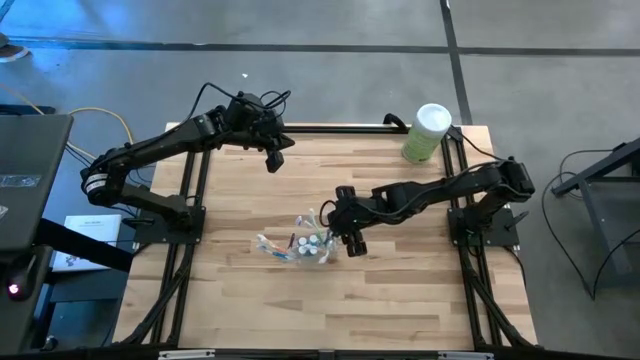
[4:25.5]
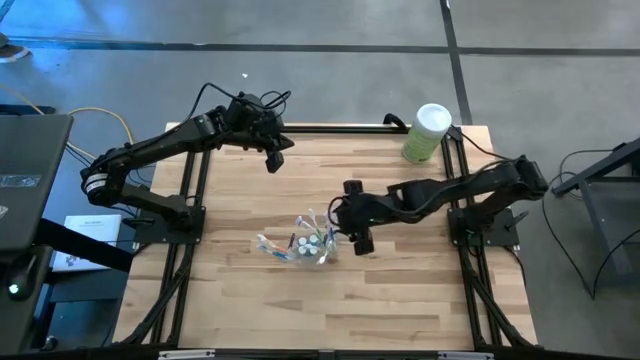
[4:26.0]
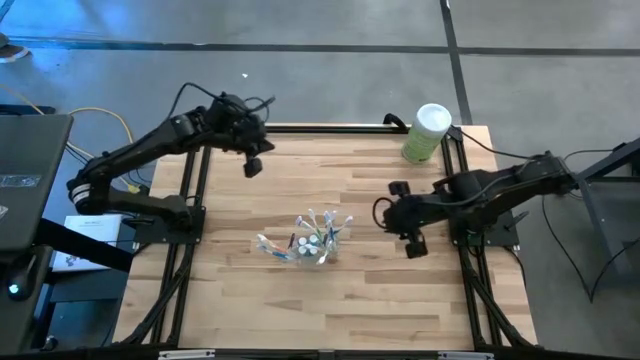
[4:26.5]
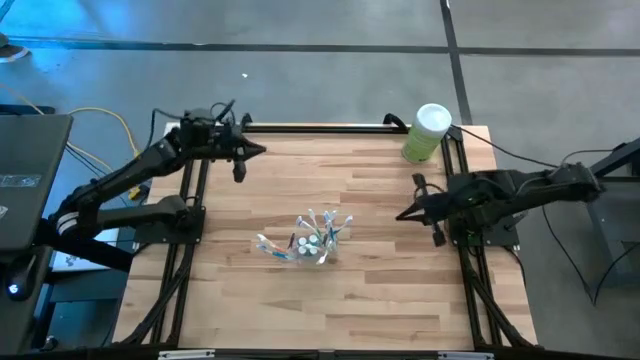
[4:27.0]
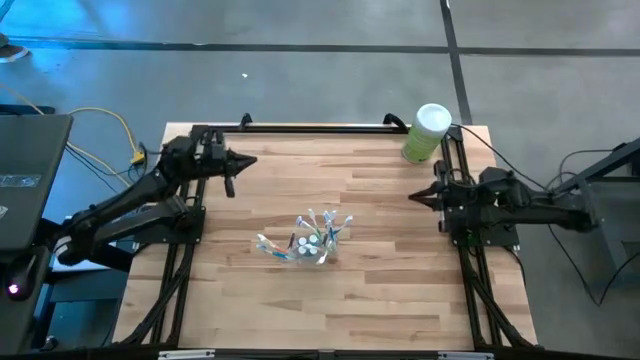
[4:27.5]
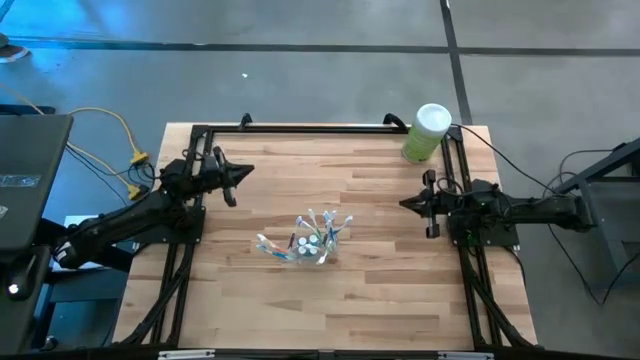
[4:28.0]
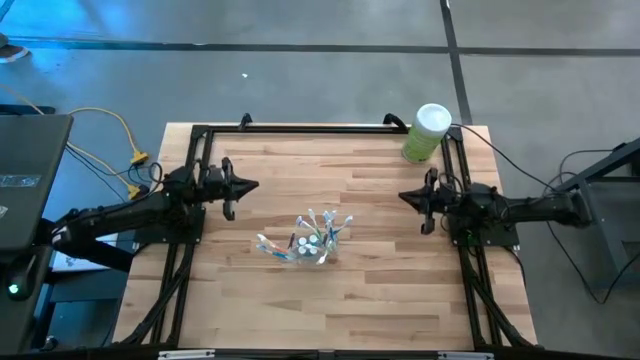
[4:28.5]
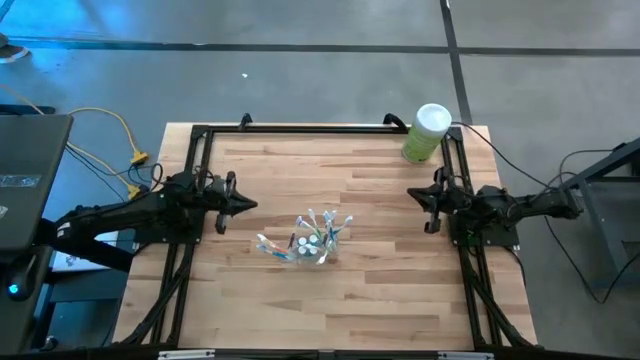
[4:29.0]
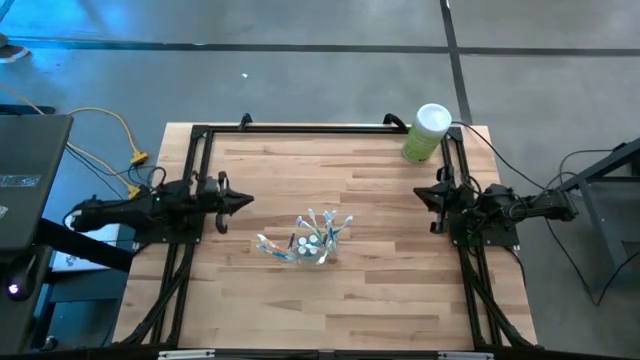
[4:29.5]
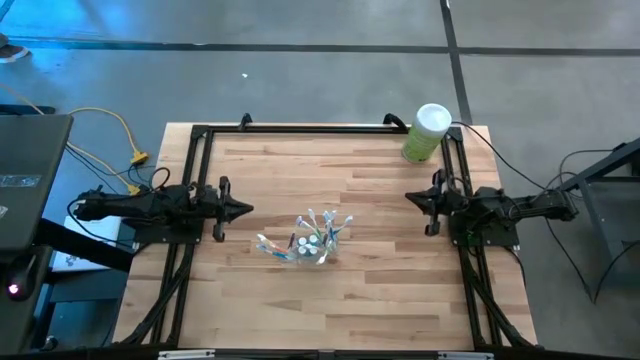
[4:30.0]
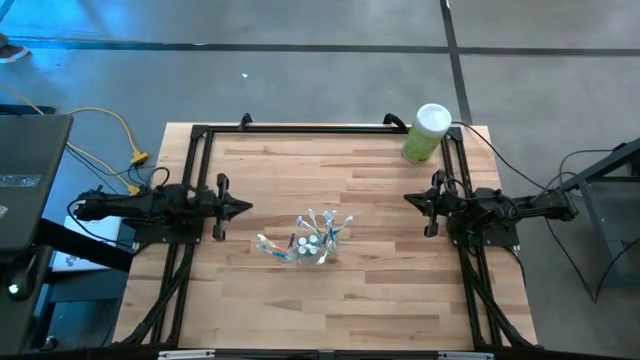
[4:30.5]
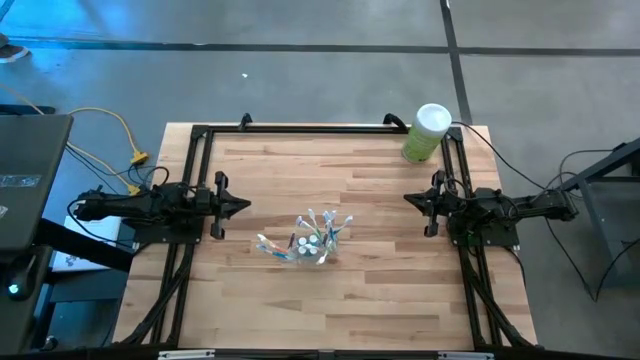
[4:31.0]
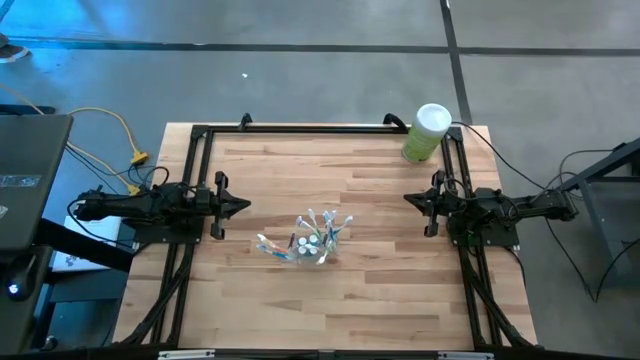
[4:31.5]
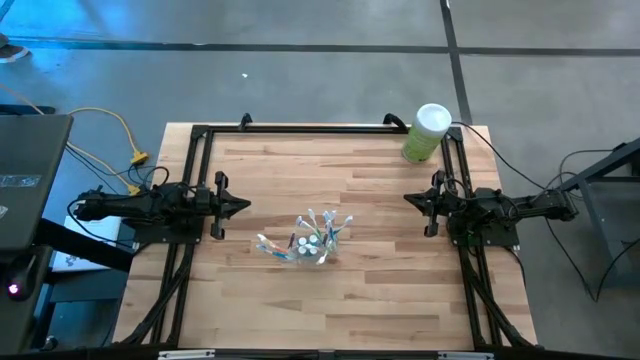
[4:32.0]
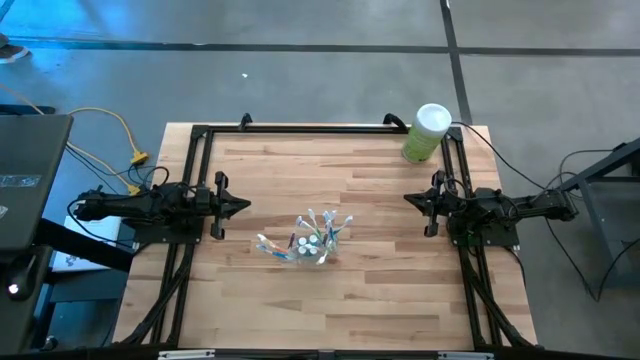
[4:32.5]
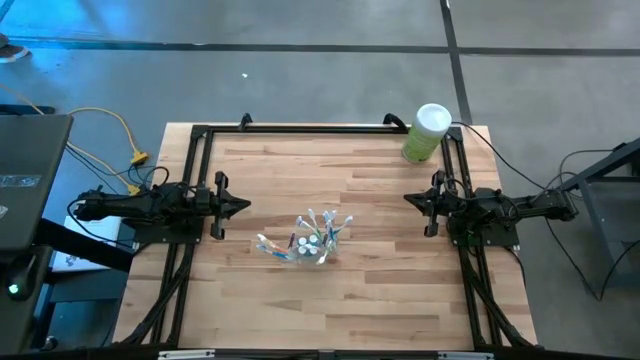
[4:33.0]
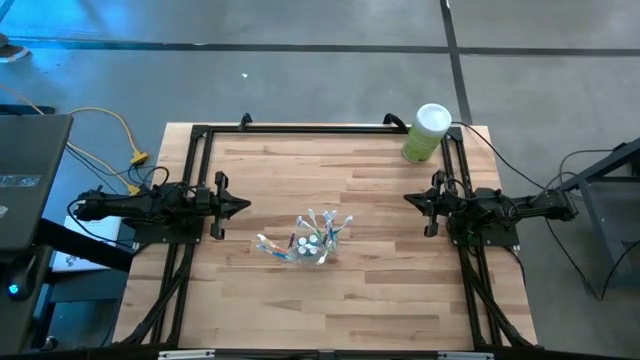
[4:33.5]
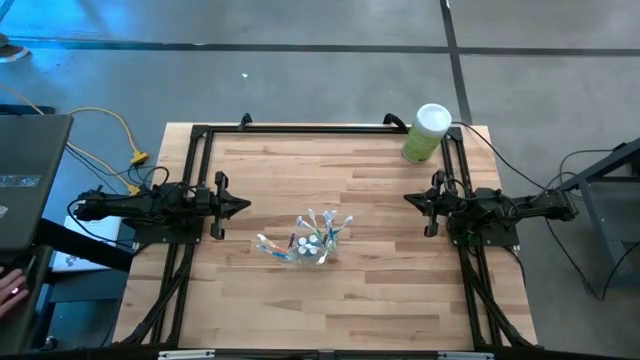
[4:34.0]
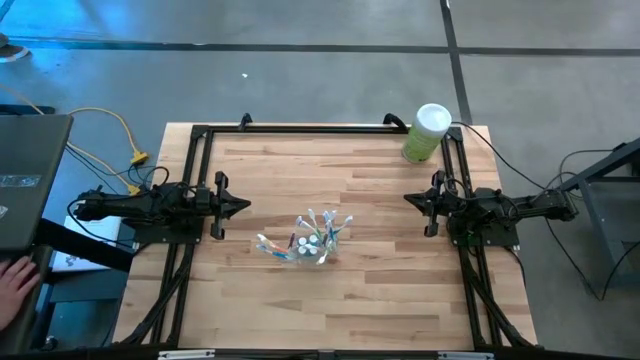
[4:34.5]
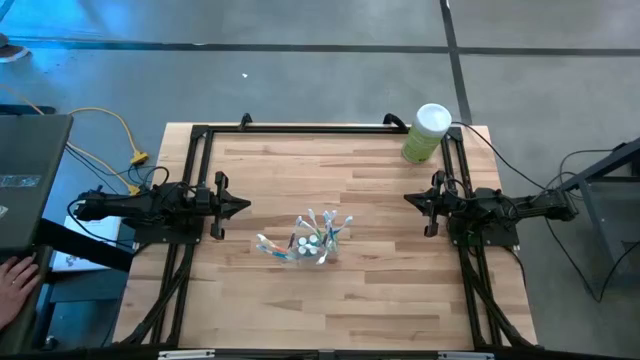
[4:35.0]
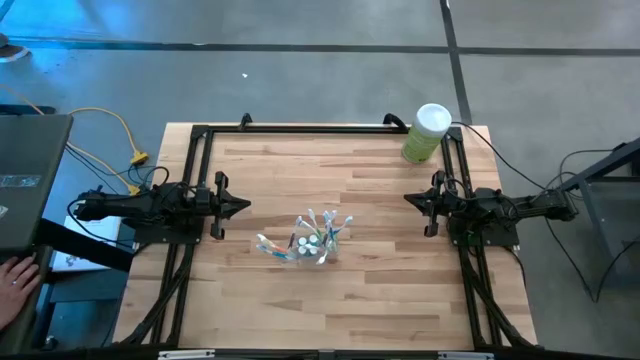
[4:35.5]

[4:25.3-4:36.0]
Task: Pick & Place toothbrushing station
Return to Home Position

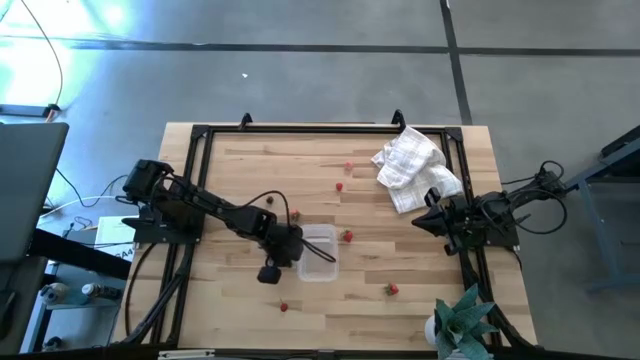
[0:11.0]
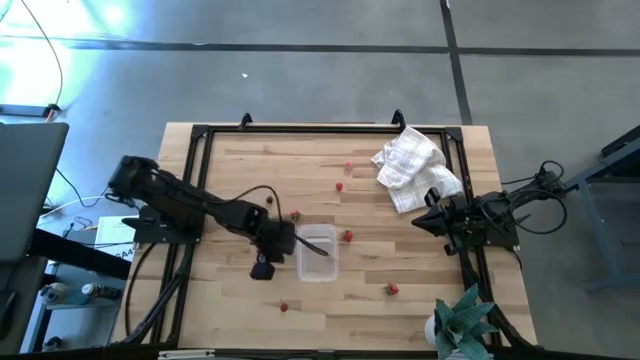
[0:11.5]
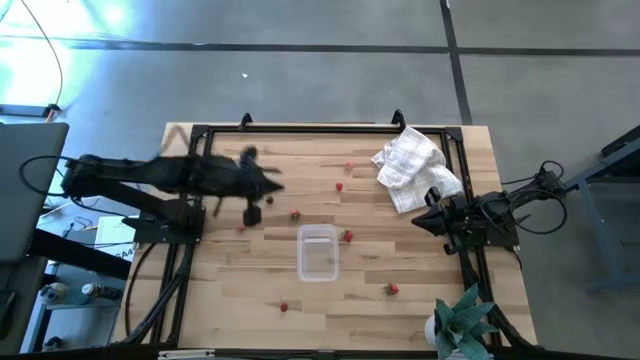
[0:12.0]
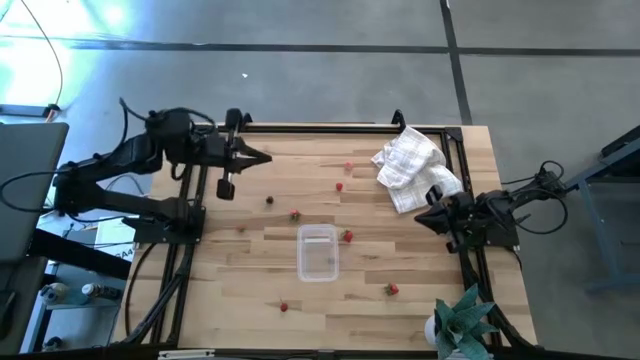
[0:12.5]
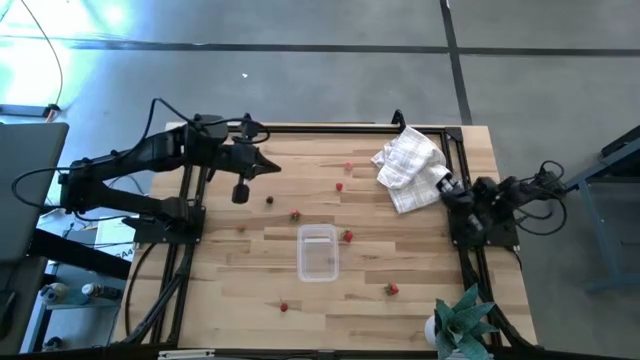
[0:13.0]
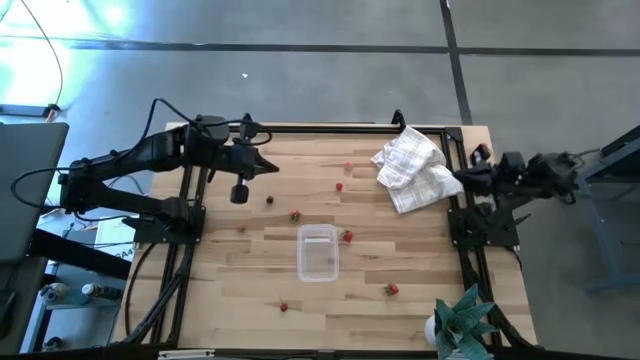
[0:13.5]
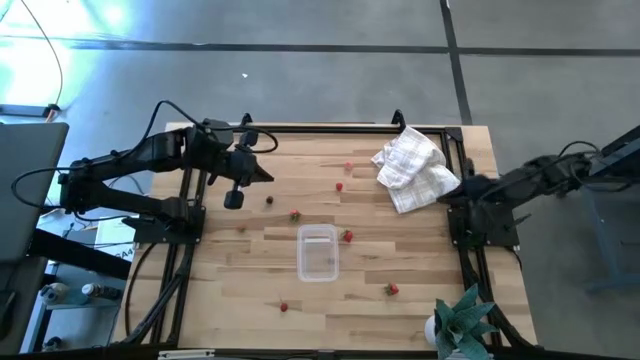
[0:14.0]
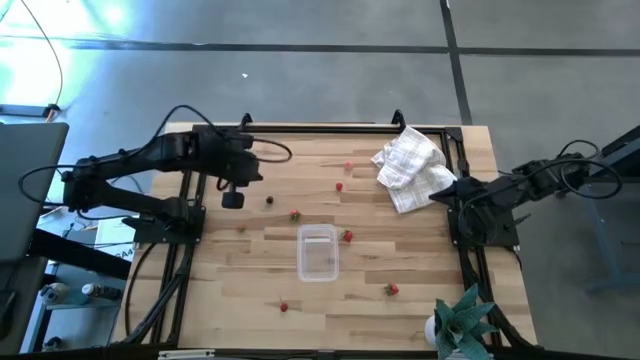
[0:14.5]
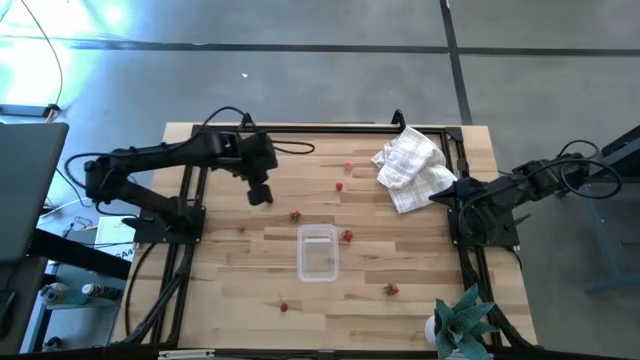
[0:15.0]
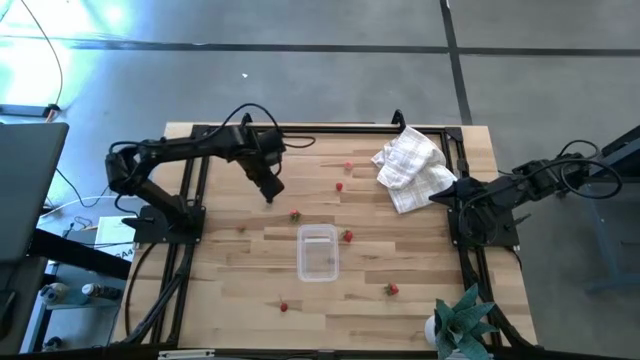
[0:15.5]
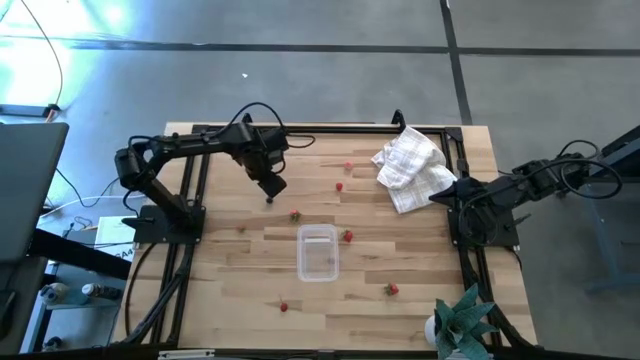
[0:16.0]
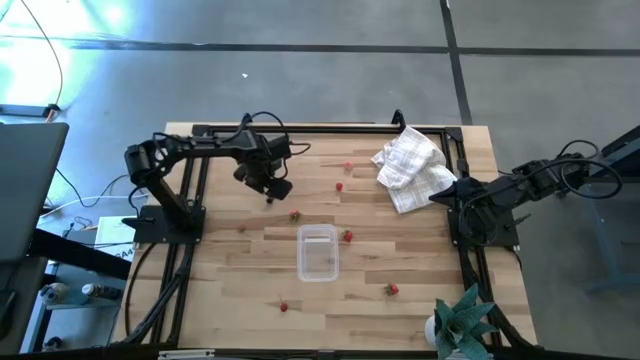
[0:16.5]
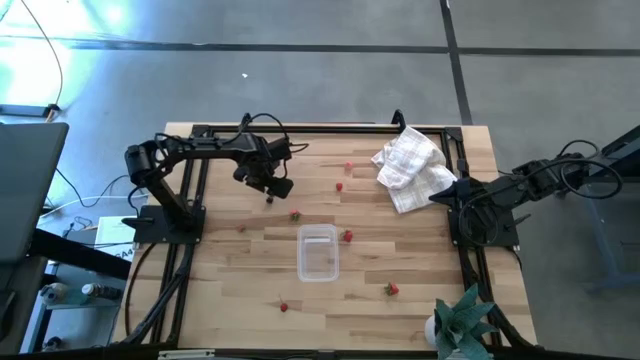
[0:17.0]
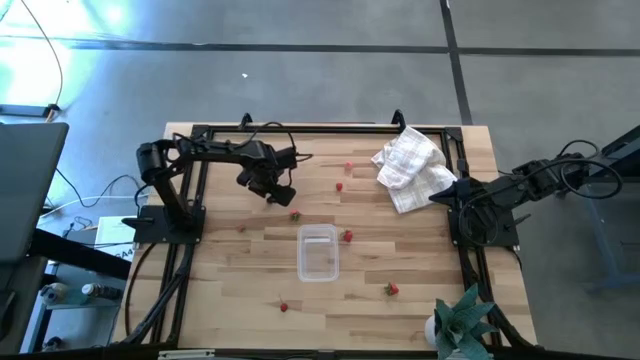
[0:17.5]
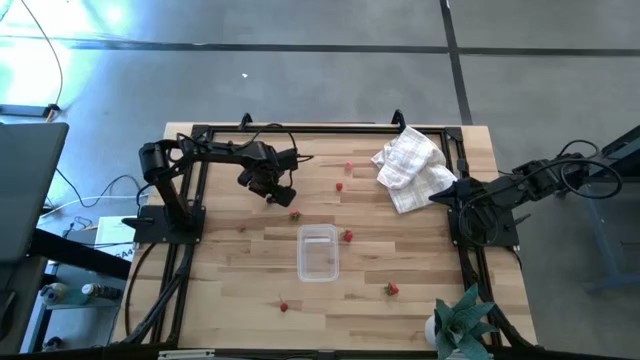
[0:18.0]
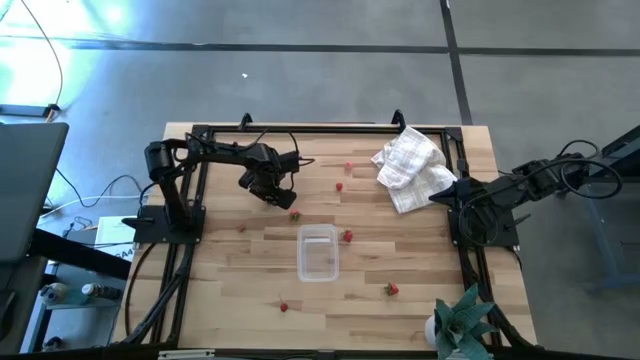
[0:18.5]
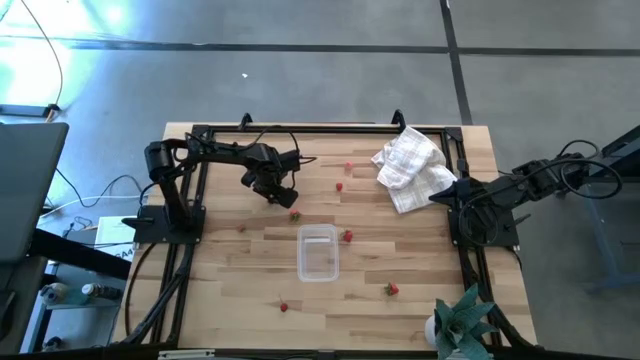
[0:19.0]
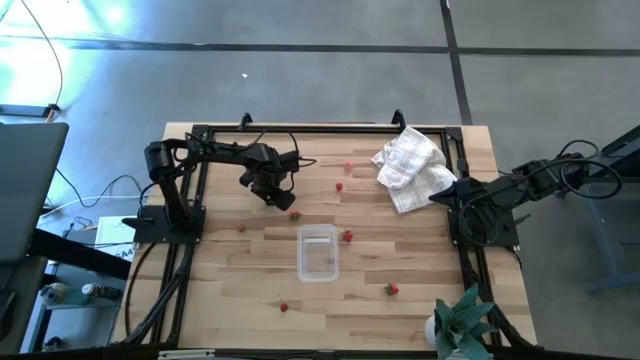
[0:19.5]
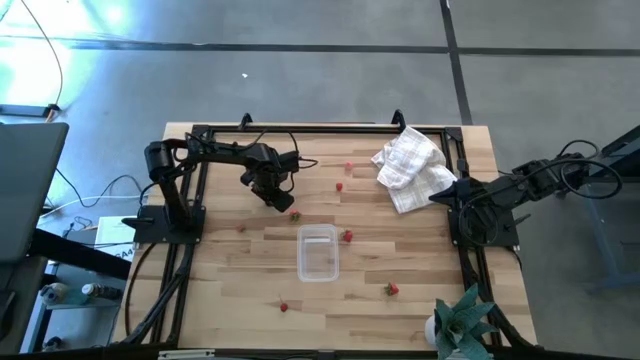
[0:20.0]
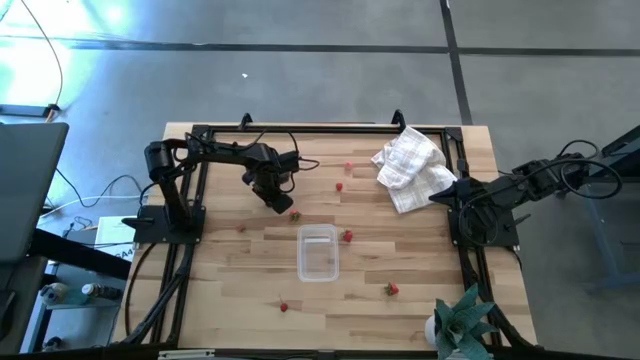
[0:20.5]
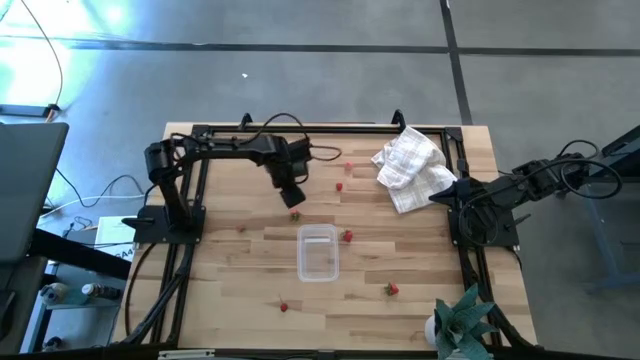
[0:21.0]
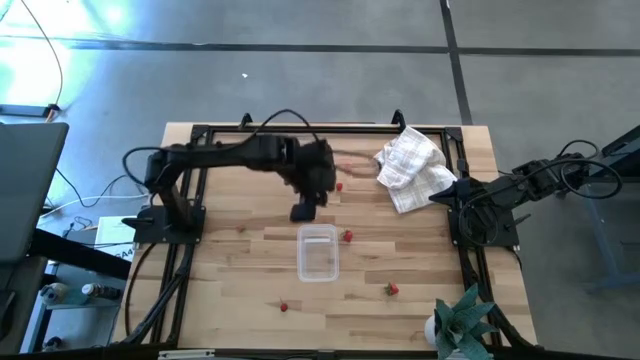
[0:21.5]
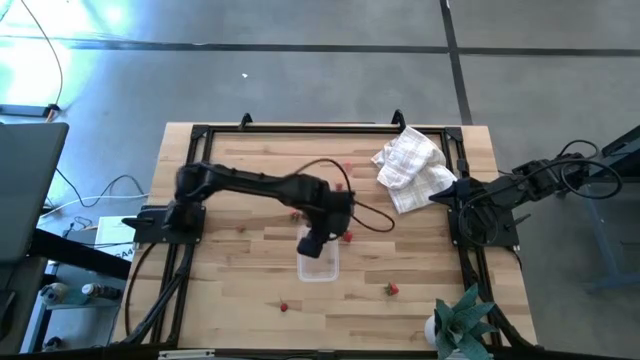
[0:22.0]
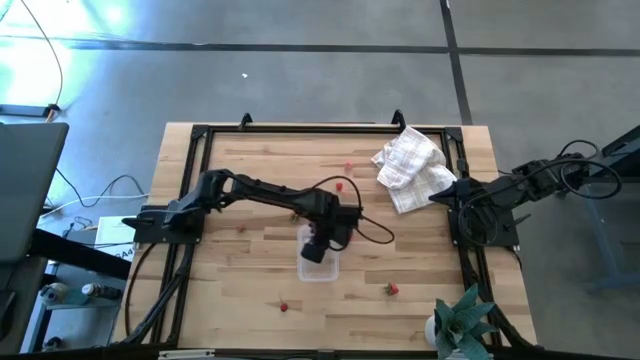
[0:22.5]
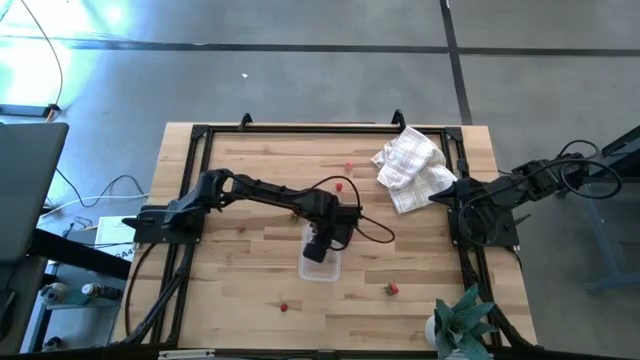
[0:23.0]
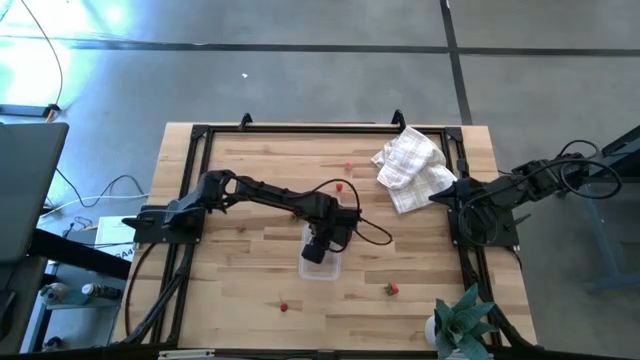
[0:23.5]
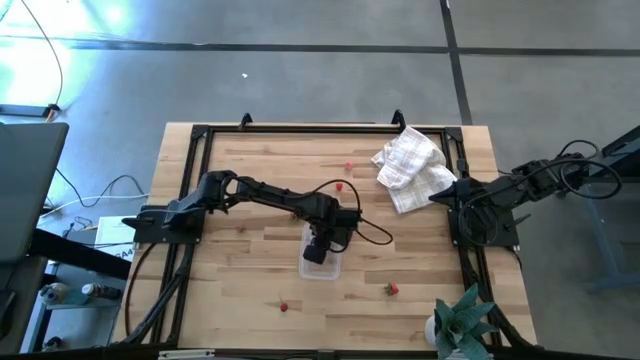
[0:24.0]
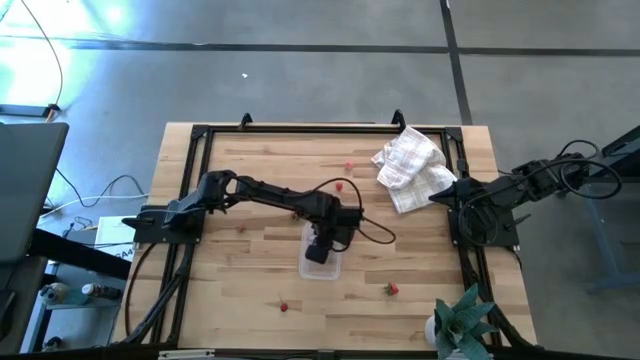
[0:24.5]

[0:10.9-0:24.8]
Task: Pick and placing Produce into tupperware
Put the black cherry into the transparent container
